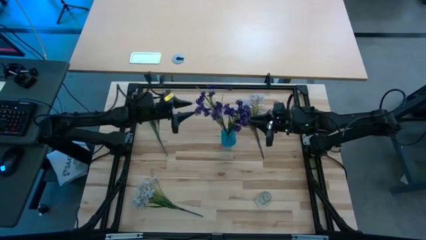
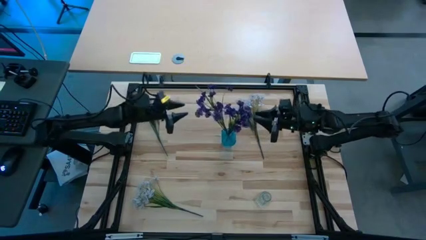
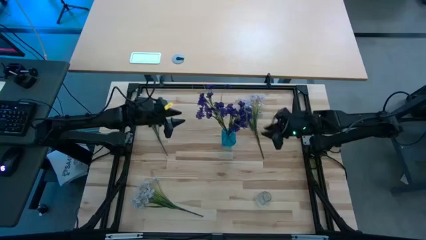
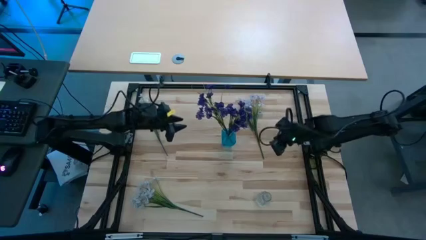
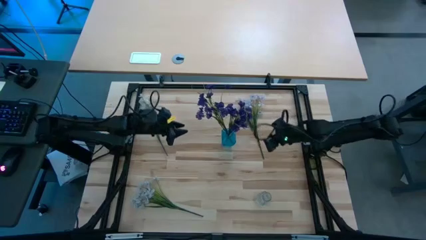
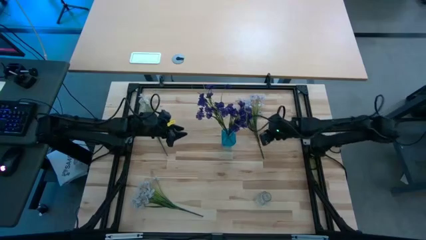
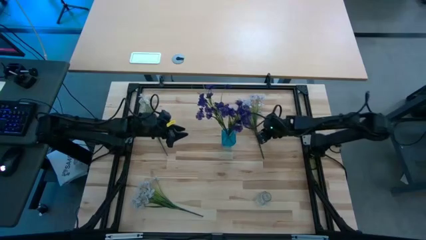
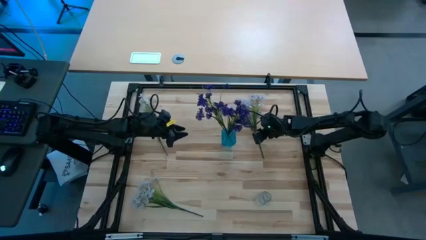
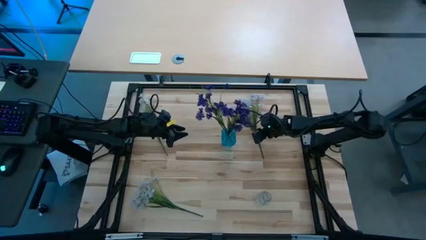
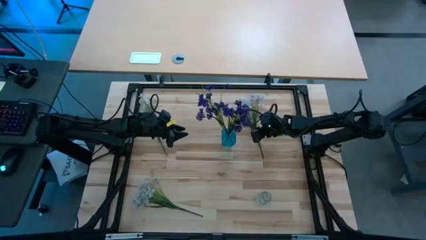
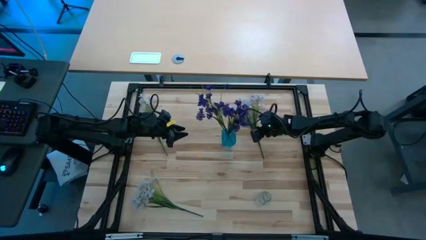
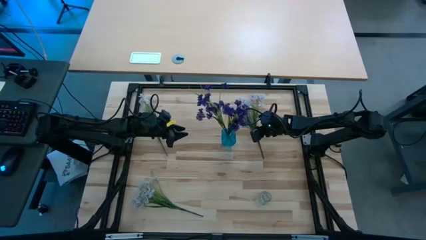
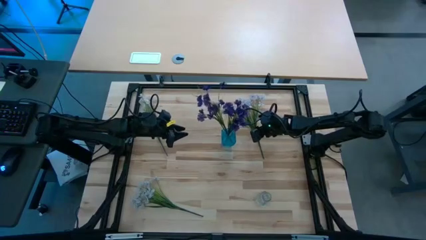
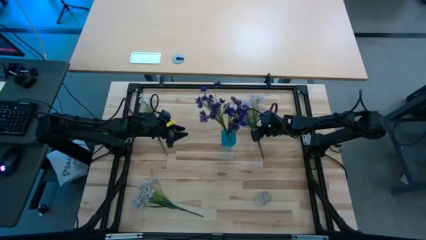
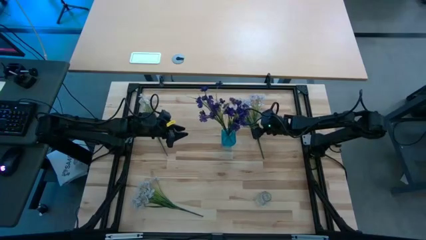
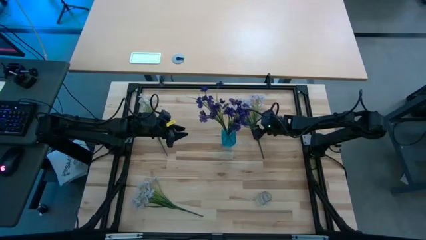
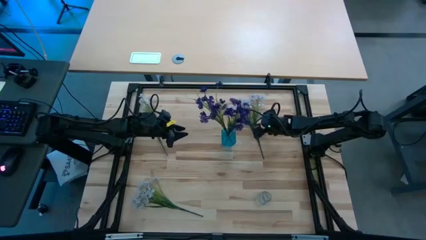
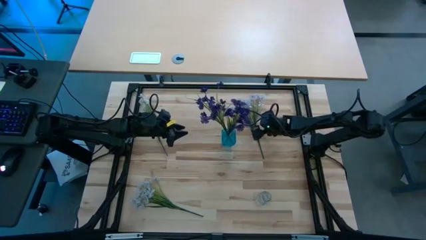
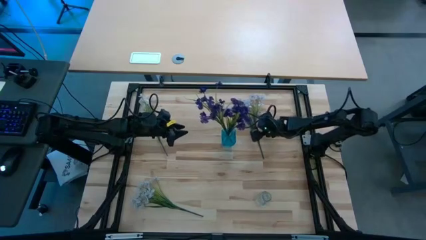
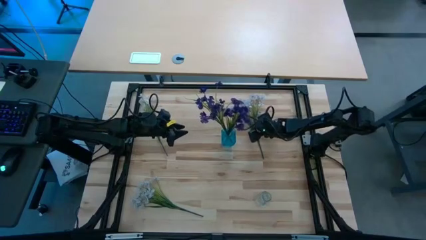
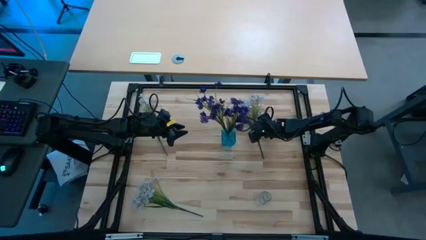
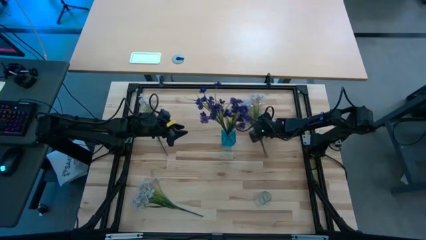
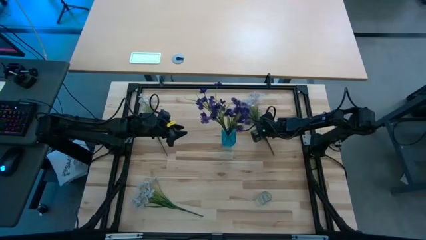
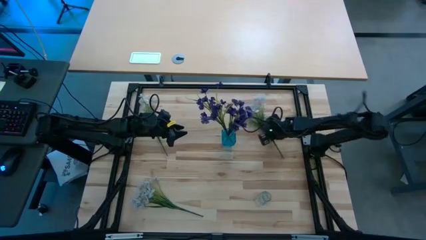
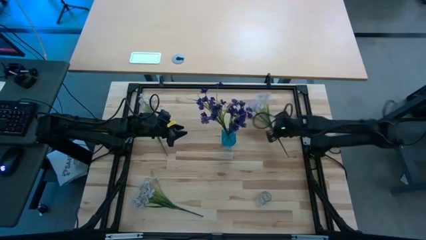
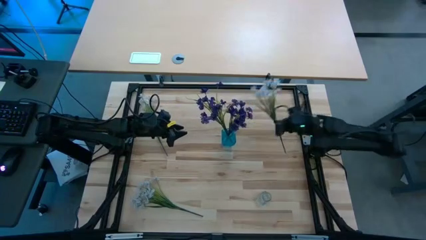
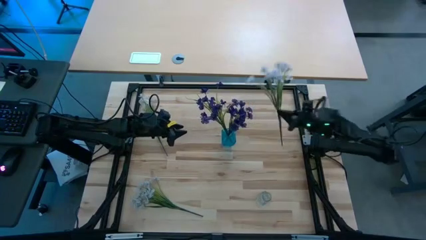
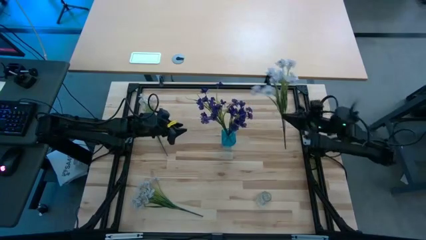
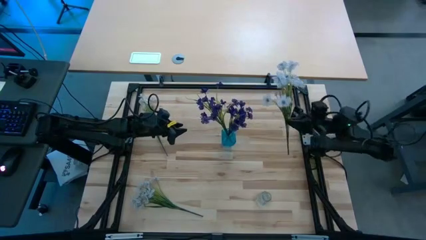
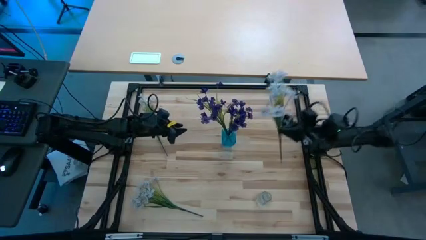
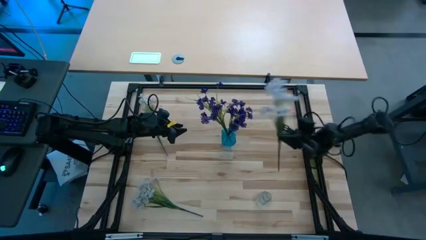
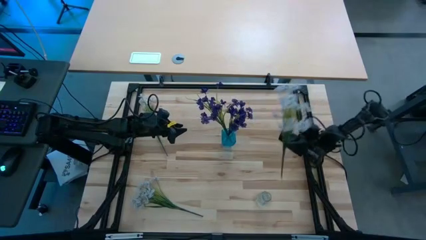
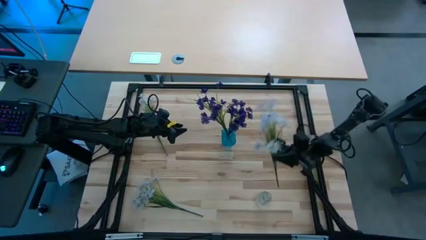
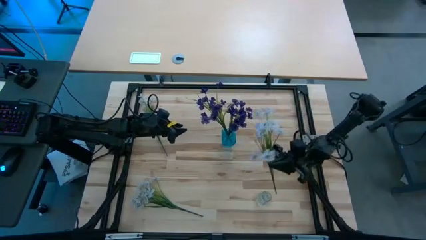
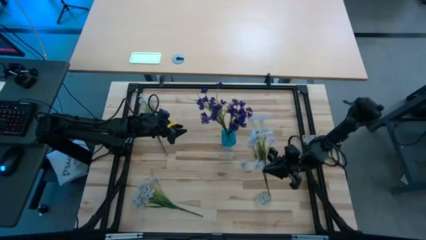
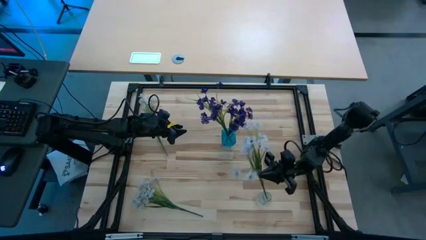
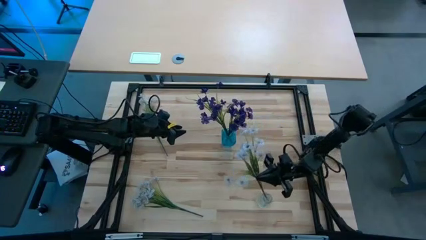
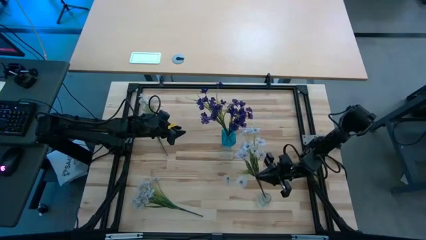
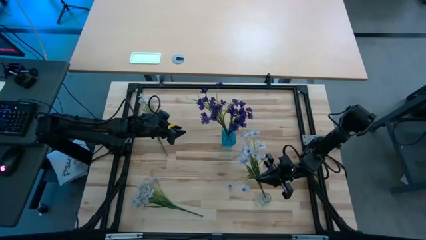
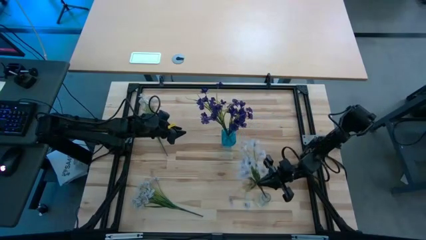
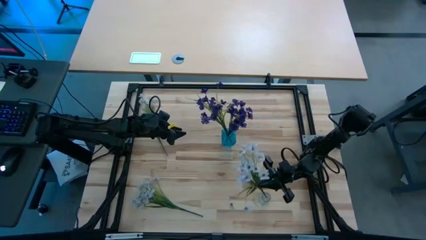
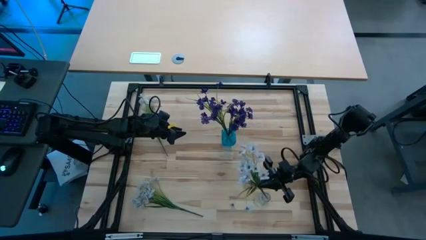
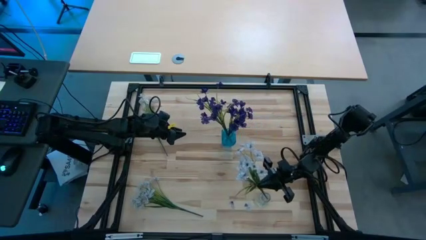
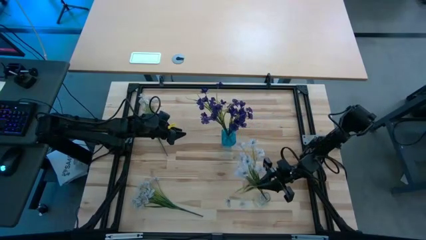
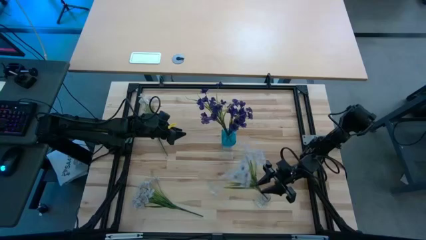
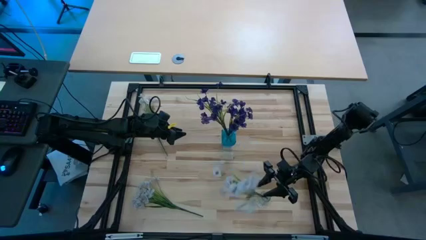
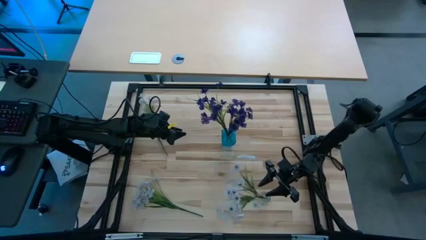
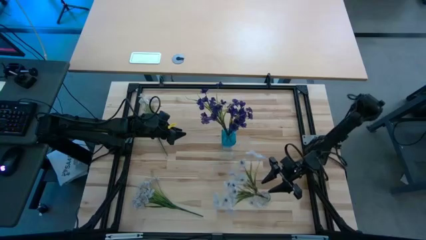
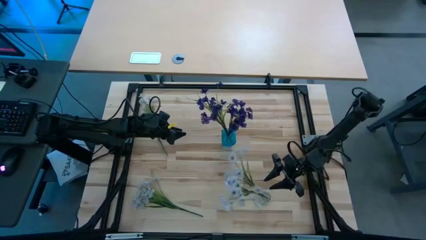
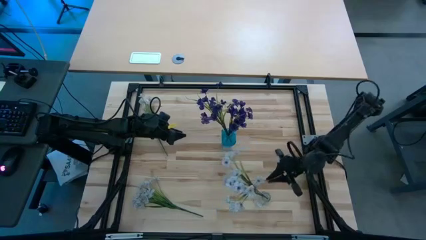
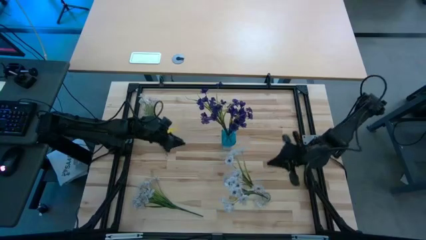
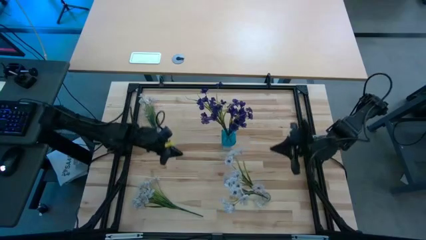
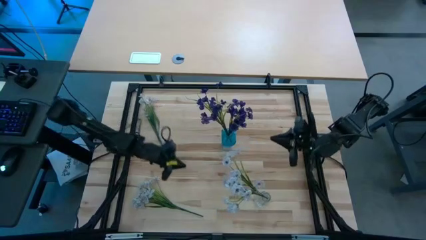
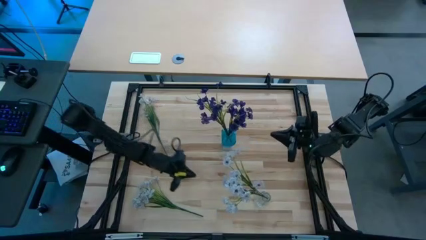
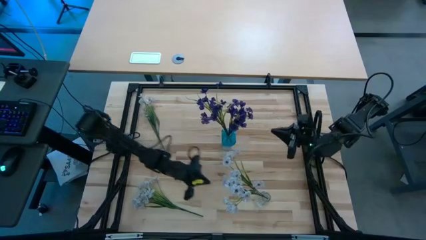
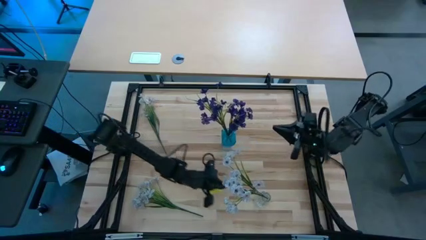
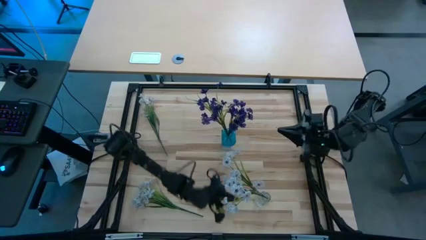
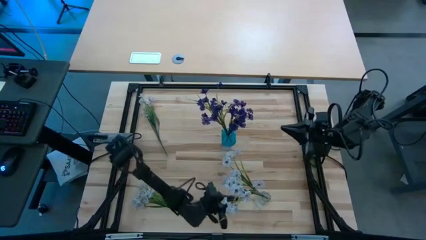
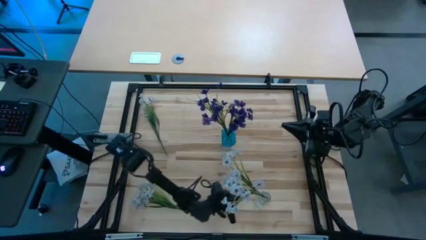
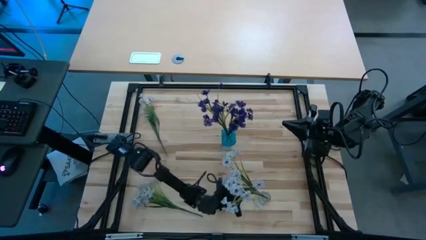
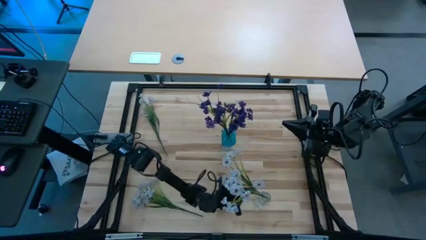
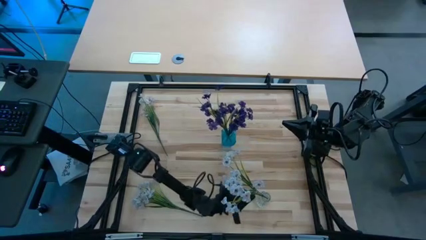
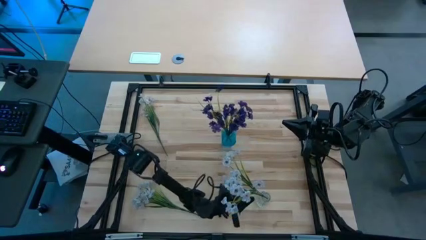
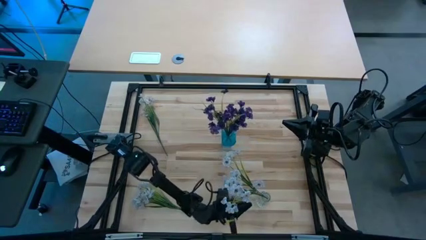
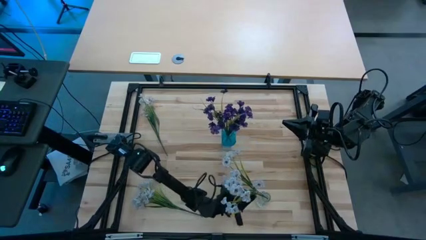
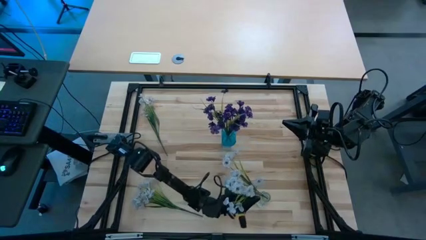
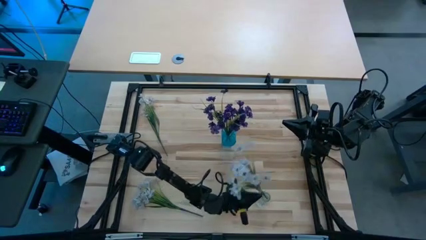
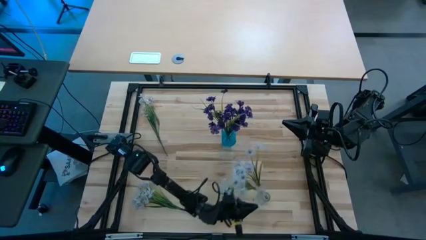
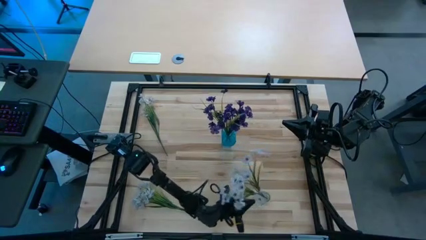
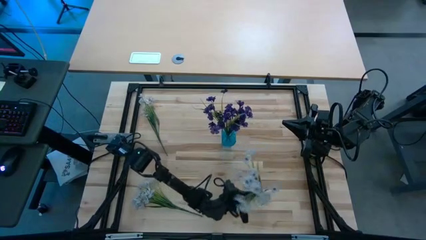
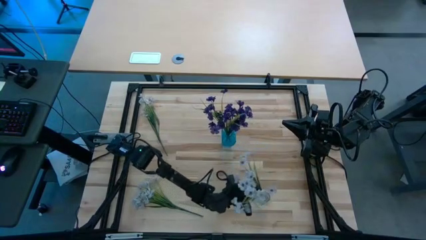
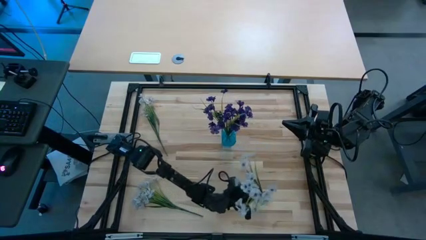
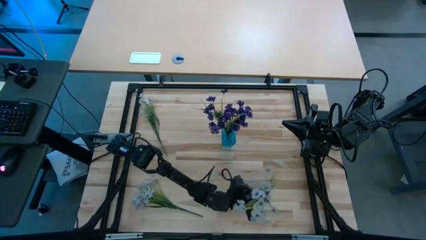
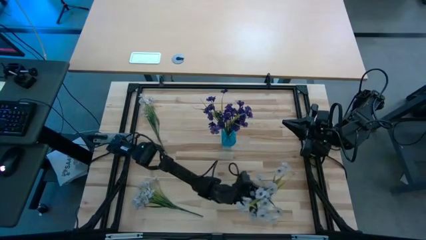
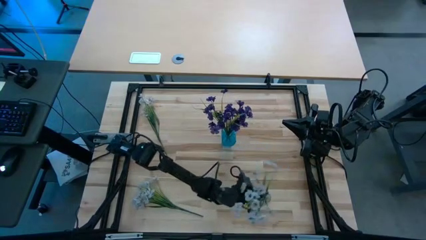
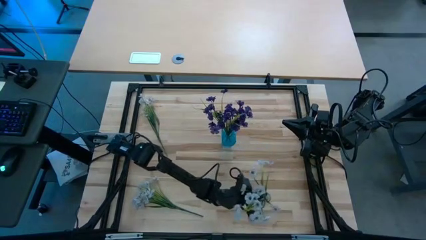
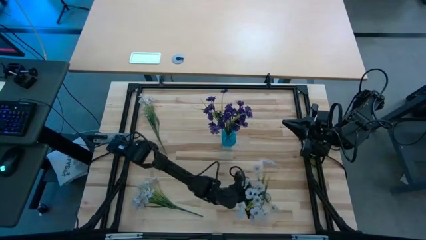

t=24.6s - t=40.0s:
Task: Sort flowers into vase by color
Put the top right white flowers into the transparent crystal vase
